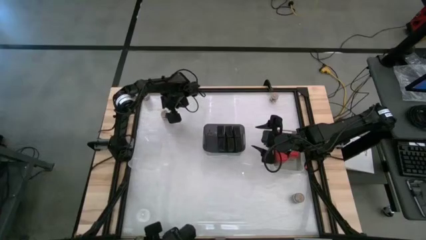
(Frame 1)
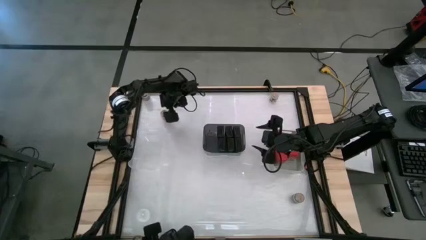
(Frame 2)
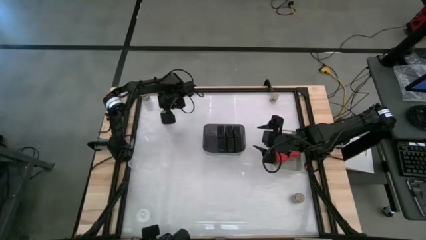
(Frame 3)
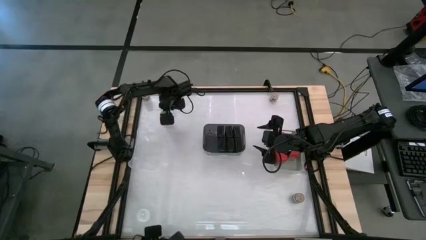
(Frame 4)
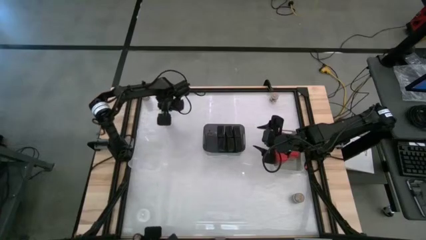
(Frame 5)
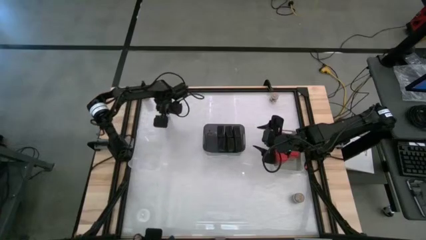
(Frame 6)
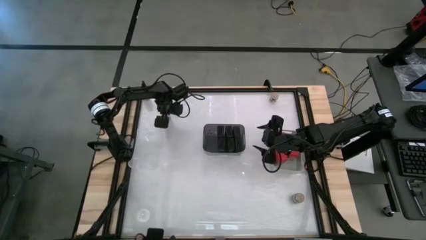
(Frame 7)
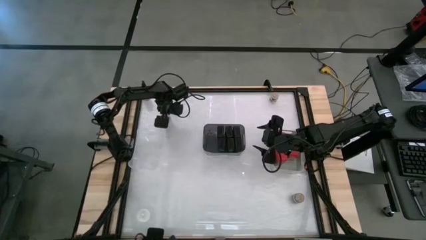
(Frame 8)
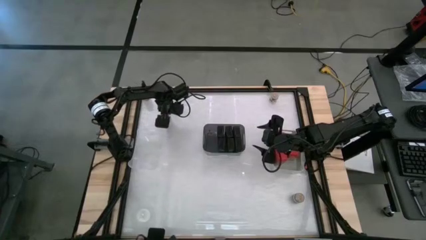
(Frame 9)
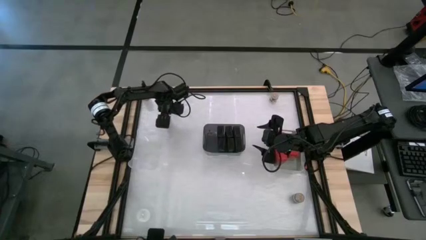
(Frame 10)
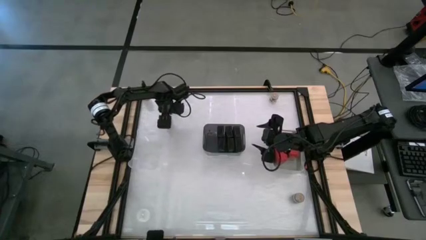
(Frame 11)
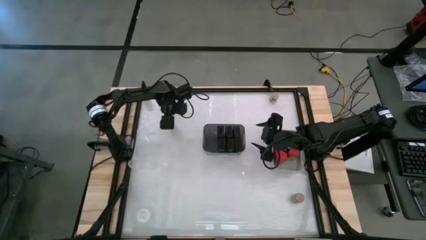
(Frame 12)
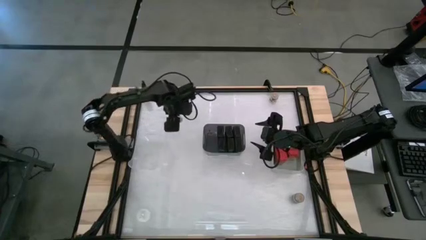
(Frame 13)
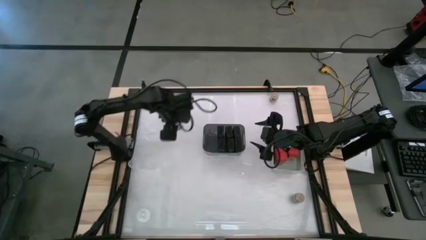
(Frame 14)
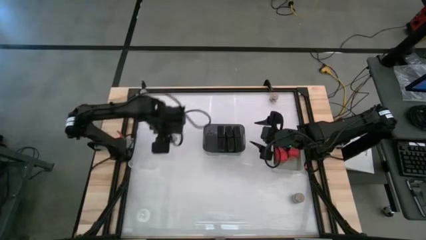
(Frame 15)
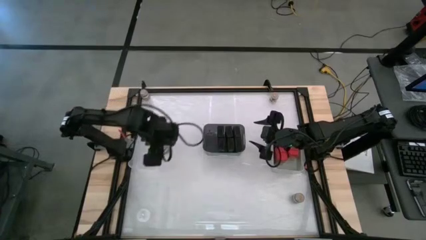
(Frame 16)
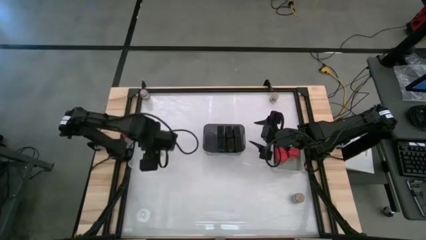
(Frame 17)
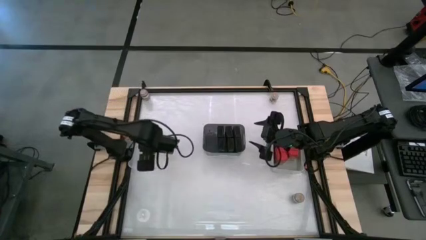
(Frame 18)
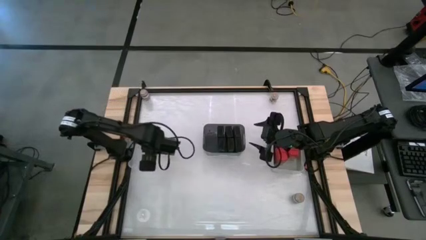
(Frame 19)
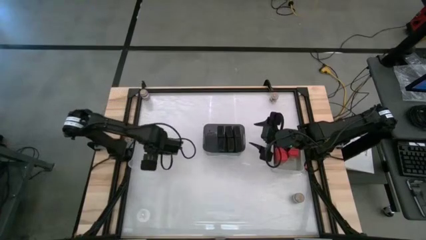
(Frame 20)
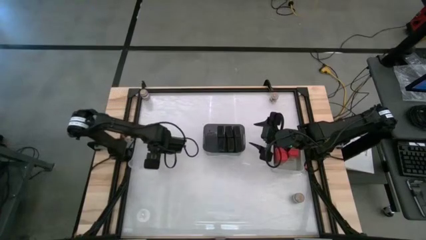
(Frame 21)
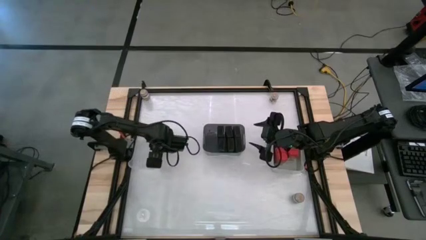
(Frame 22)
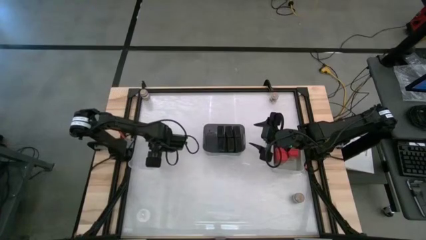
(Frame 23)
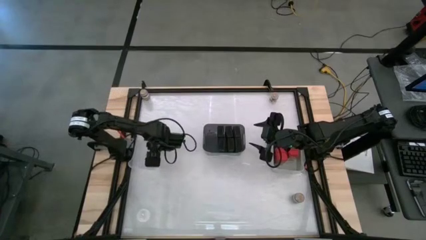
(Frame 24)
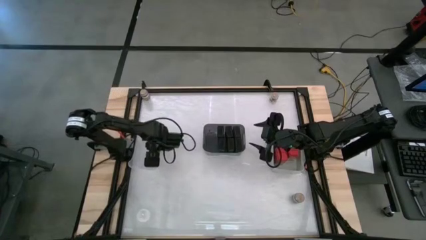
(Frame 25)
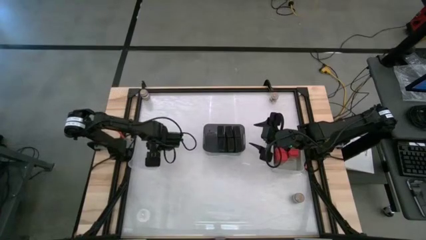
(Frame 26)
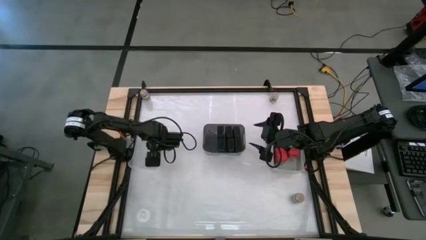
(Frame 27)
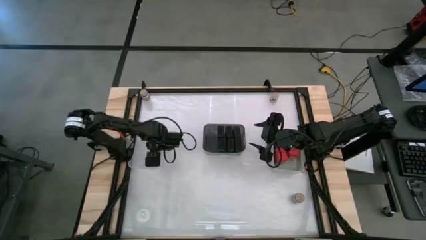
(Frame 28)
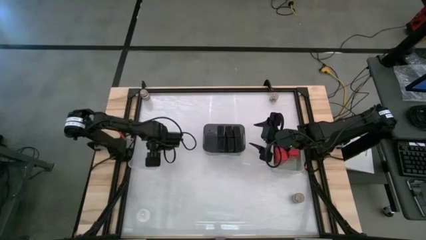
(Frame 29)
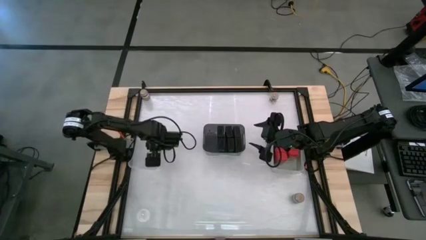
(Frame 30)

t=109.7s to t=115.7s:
Task: Sort spices by type
Put the brown spice bottle into the transparent bin

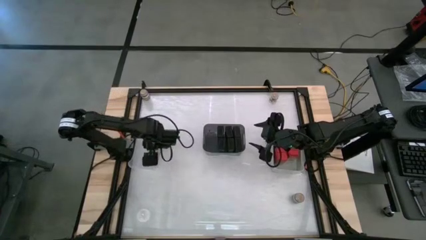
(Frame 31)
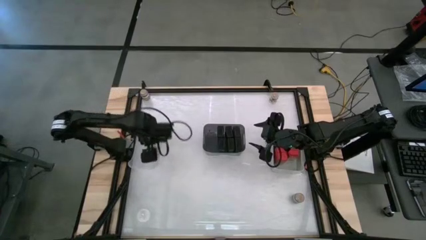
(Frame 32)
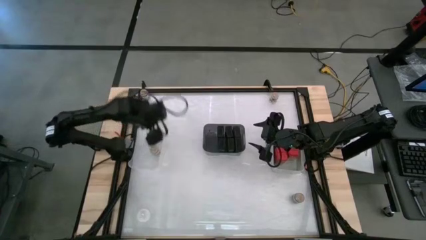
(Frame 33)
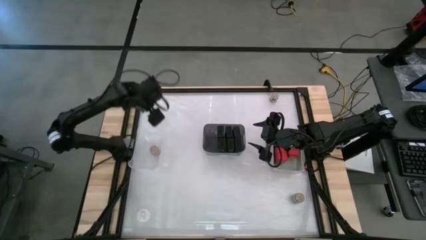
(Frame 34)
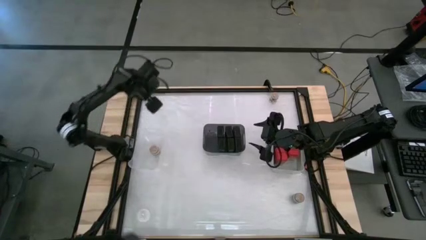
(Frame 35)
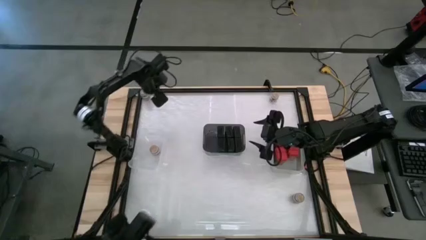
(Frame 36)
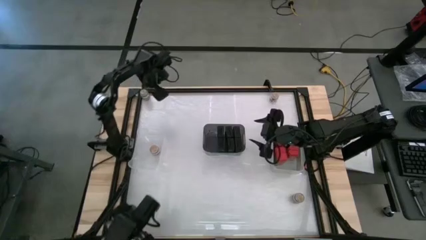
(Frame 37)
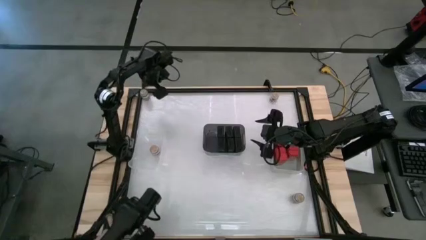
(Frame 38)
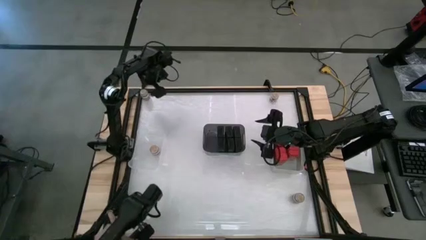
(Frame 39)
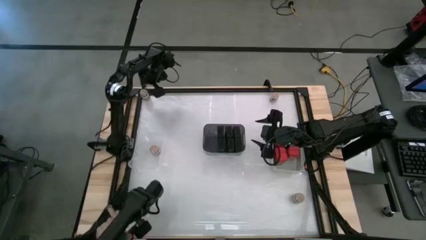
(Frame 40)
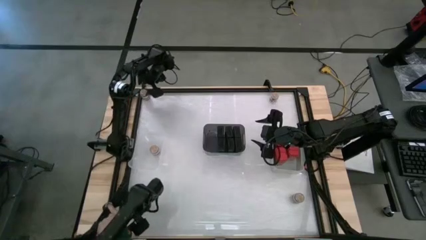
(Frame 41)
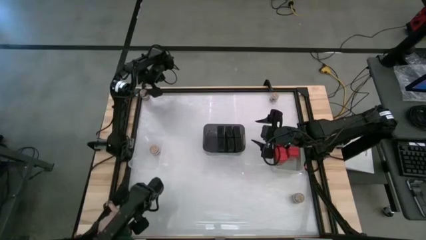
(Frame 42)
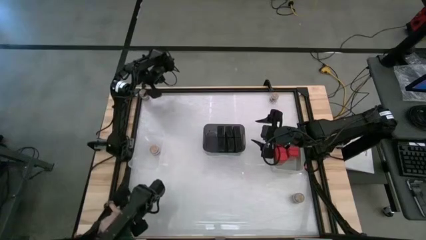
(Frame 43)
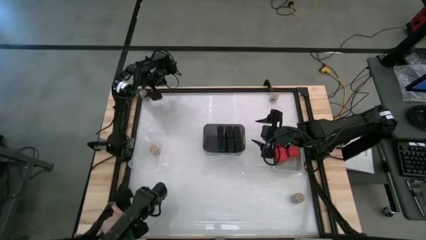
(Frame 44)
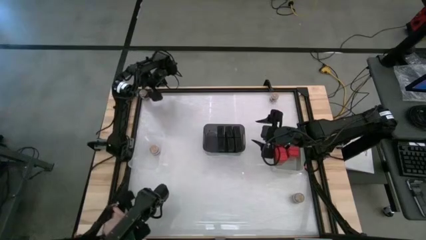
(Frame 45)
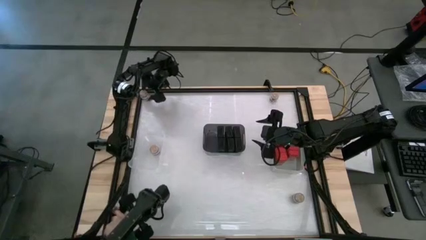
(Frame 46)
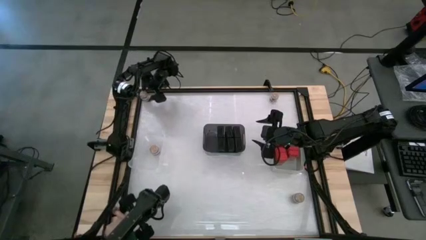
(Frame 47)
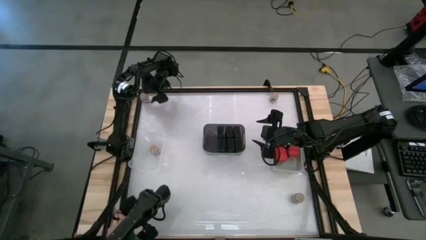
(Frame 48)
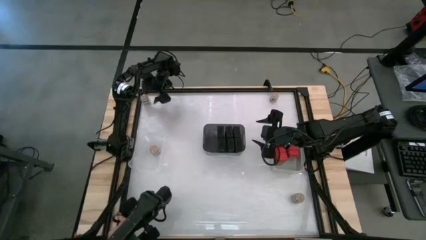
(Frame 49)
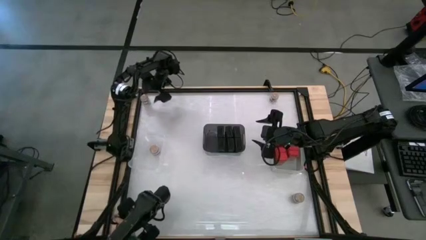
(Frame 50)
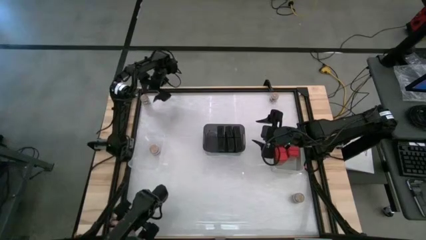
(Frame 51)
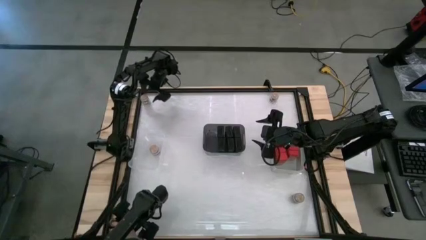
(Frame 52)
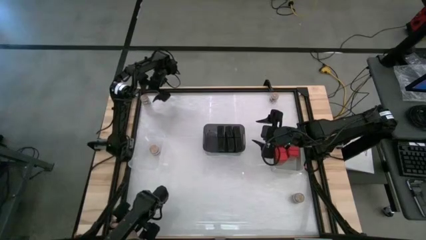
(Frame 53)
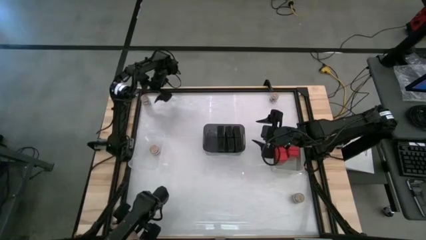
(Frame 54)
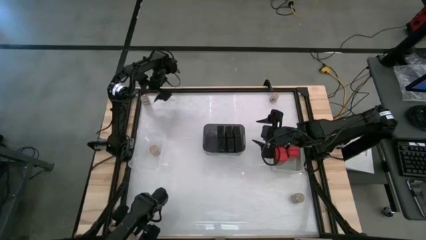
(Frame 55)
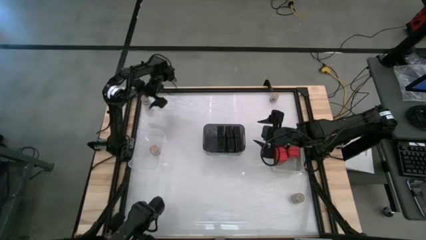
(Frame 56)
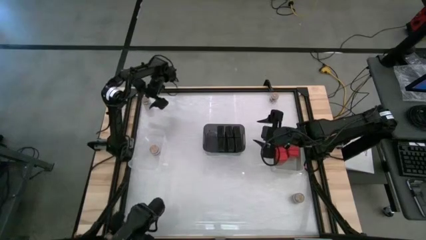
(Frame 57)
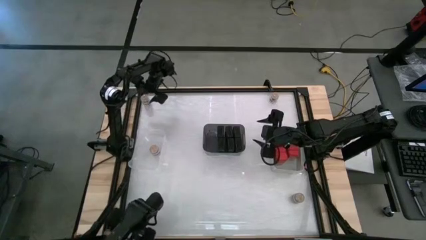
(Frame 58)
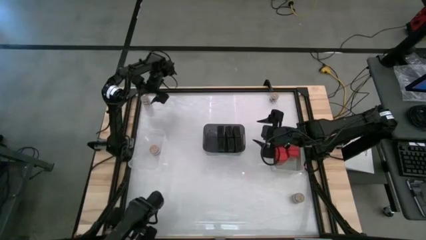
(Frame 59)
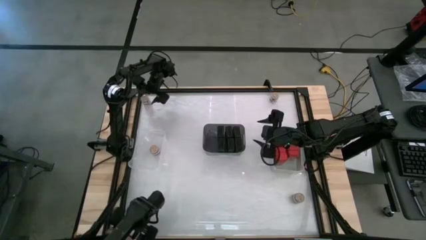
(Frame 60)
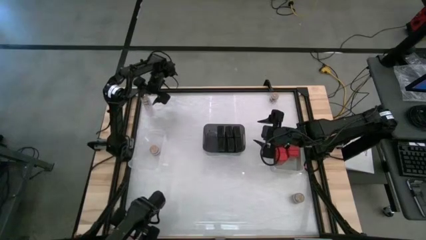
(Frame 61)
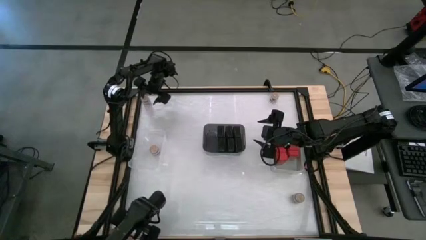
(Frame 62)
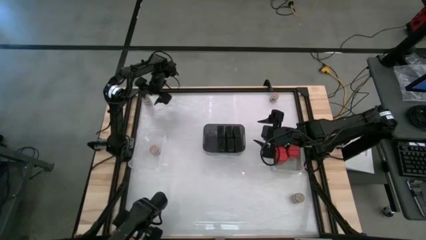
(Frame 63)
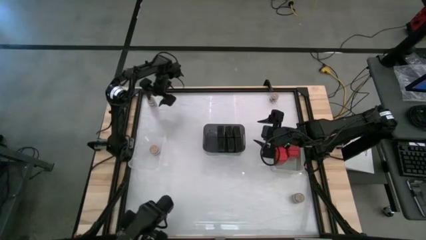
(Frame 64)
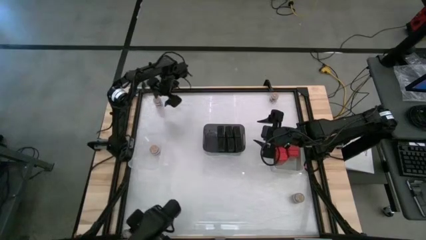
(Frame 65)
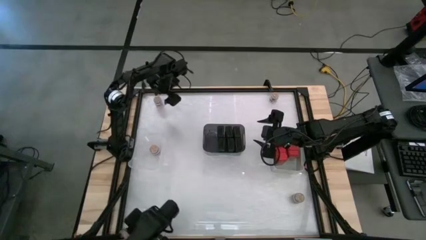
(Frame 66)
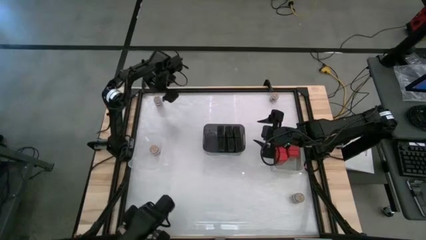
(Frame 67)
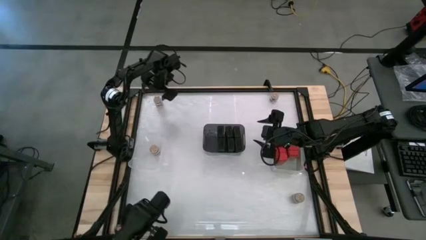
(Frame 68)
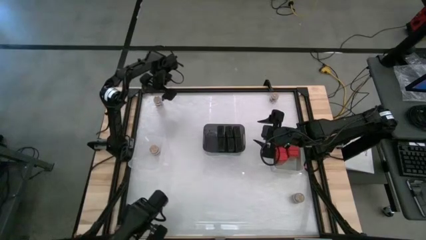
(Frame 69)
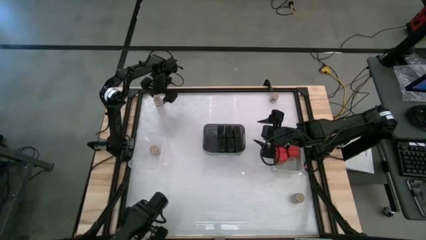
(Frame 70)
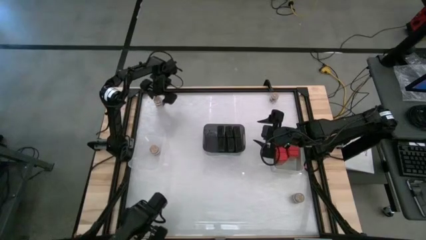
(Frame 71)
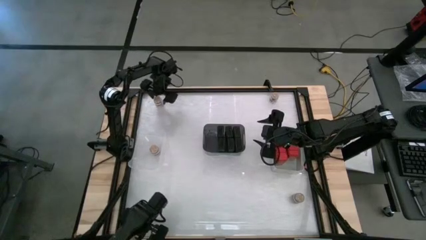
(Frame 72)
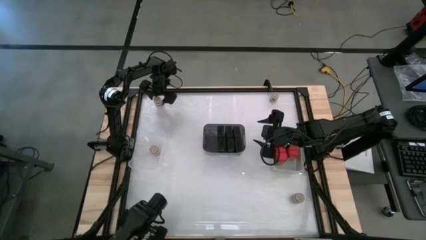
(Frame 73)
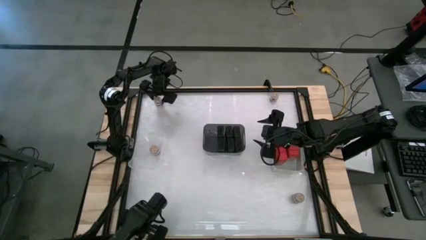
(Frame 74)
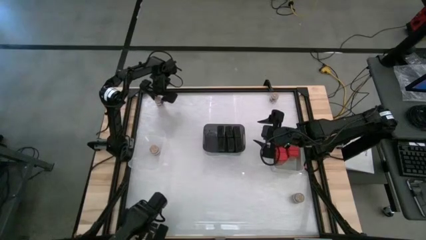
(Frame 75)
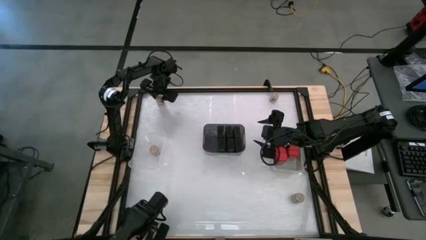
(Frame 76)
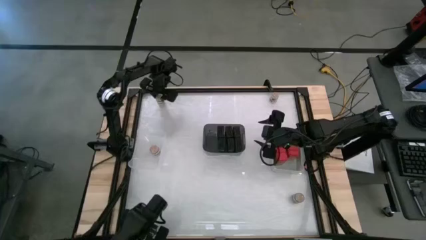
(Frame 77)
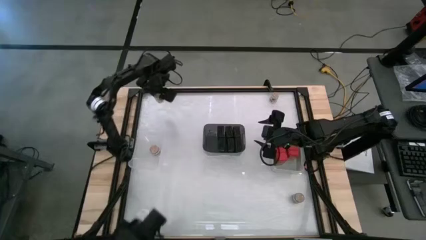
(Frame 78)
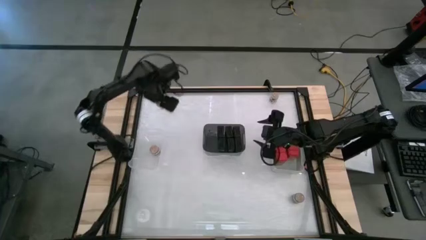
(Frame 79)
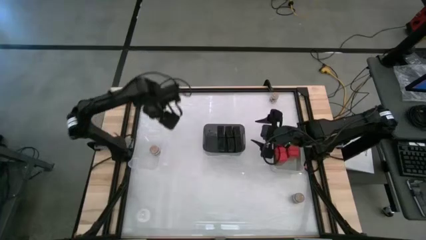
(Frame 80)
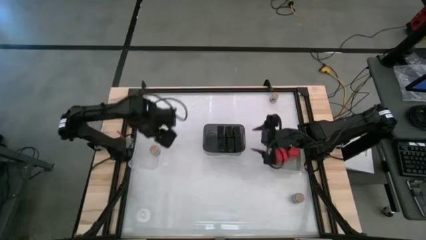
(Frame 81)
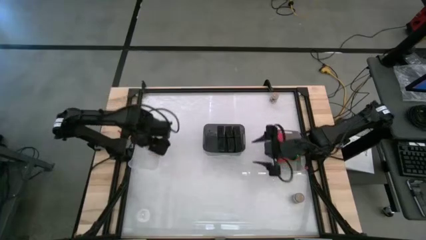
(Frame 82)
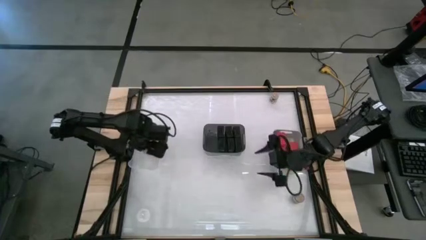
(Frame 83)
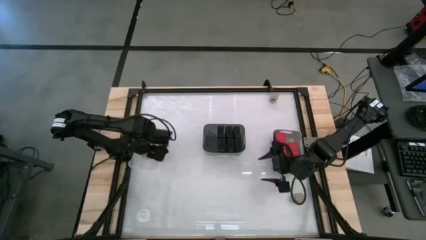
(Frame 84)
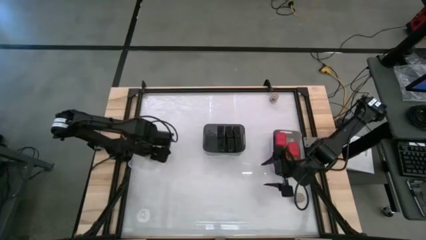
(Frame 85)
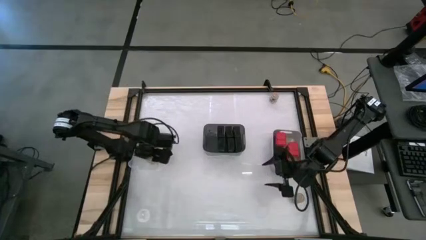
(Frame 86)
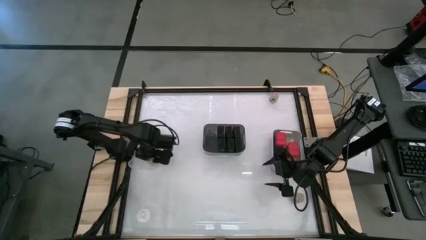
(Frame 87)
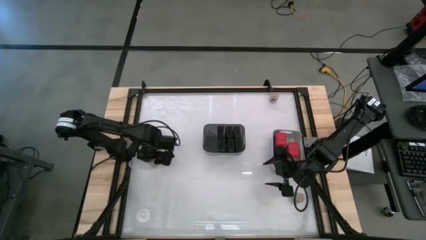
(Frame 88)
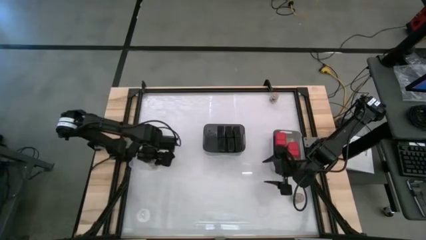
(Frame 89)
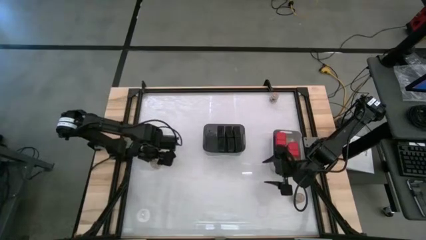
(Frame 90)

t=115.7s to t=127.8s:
Put the brown spice bottle into the transparent bin
